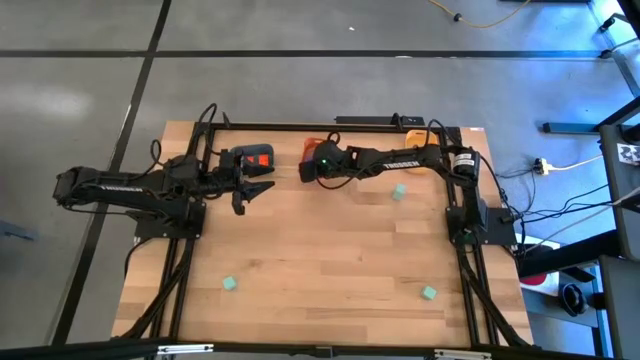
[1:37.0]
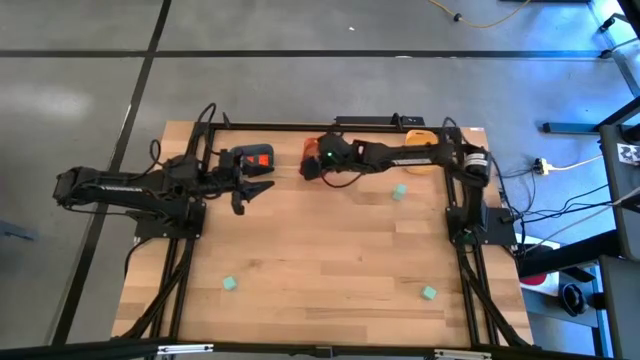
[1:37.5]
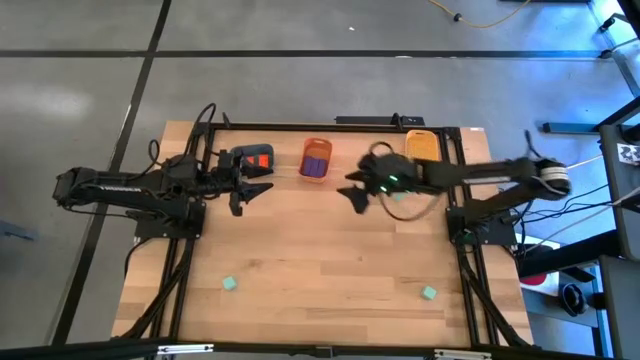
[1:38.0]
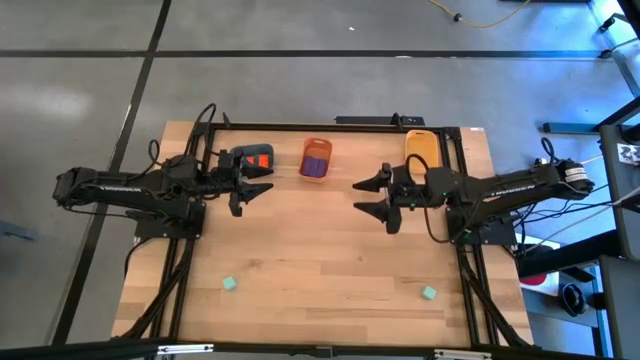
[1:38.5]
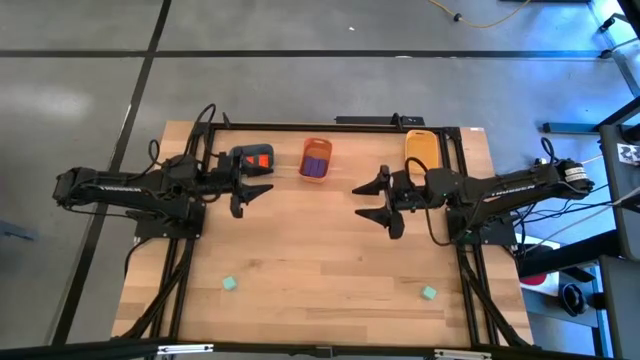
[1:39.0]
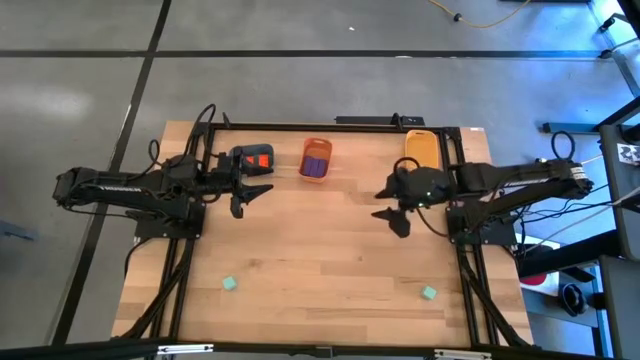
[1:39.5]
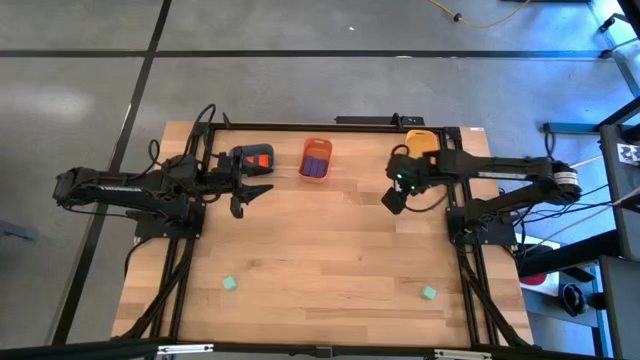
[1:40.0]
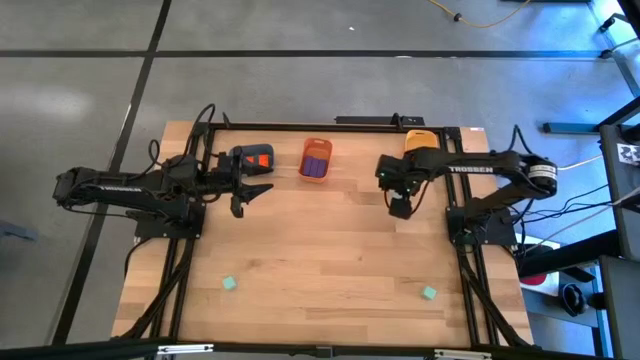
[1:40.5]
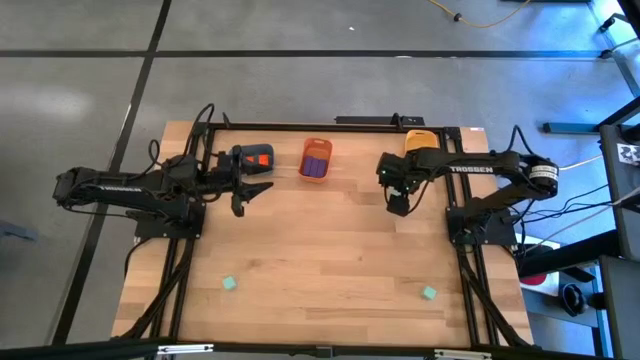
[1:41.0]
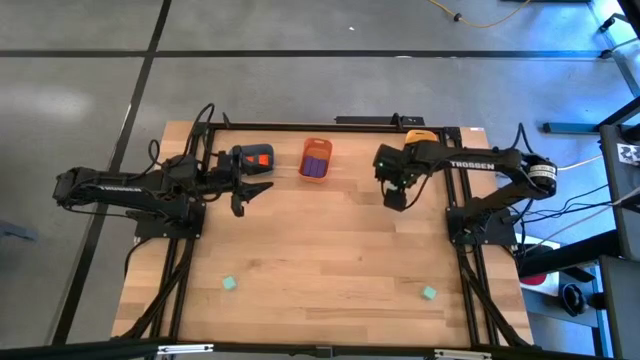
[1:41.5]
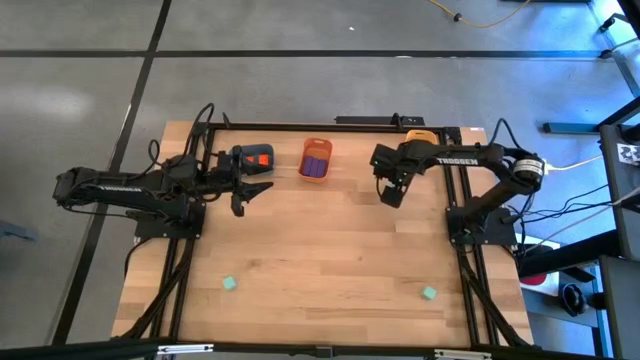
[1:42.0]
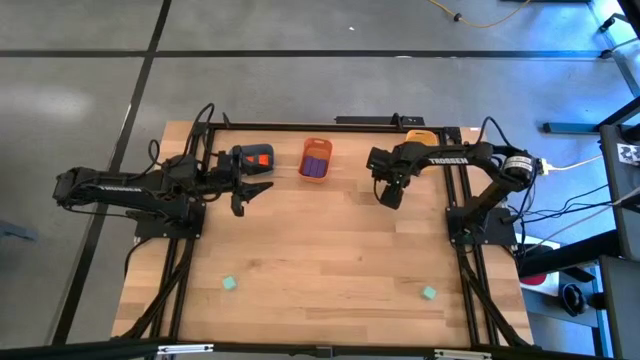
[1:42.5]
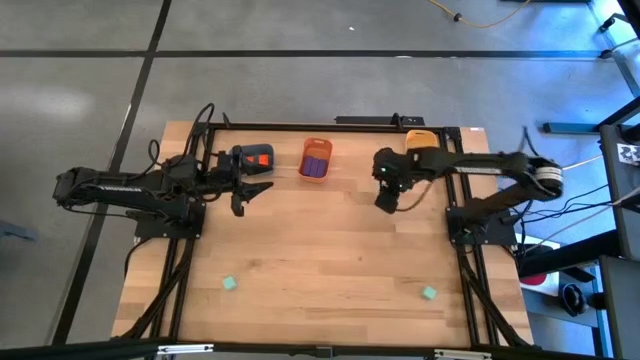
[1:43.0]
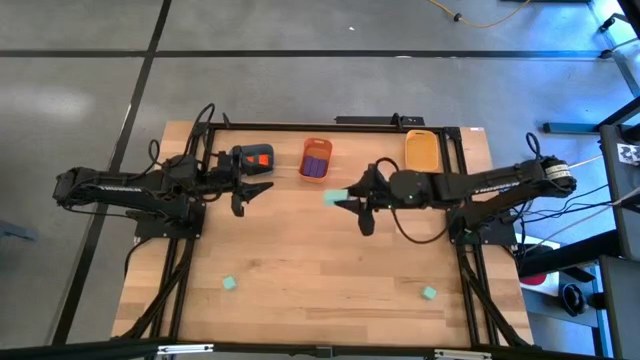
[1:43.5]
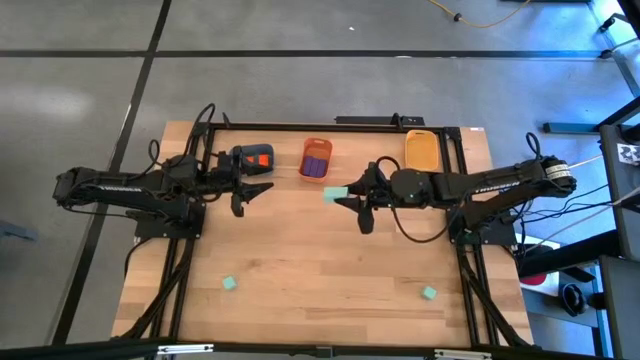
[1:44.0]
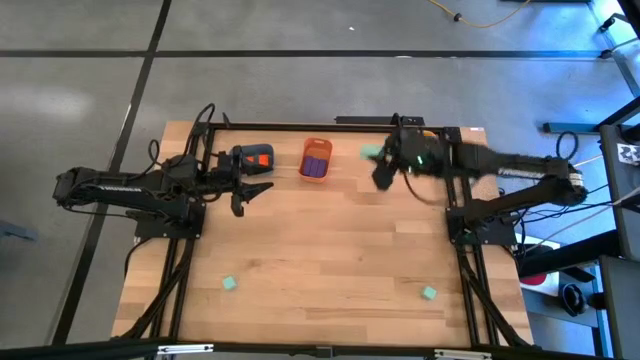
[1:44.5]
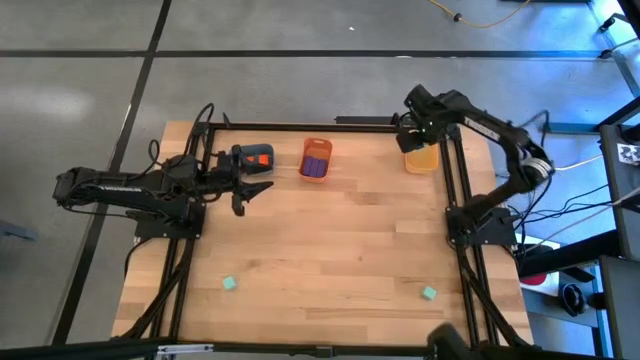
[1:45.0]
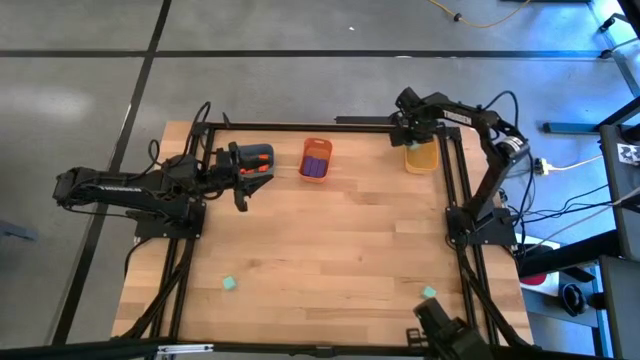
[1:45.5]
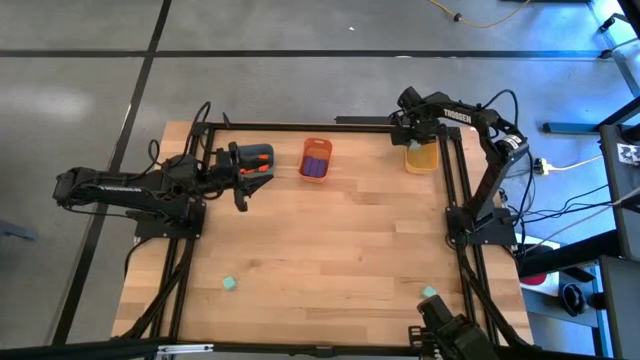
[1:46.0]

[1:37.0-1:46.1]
Task: Sort & place blocks by color
Put the top right blue block into the yellow bin

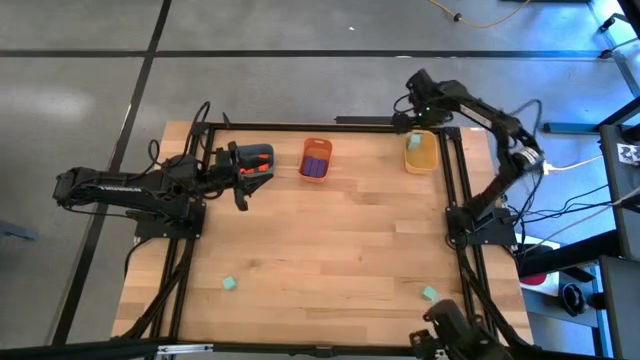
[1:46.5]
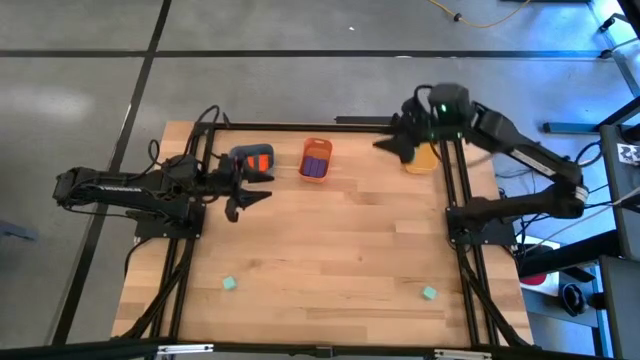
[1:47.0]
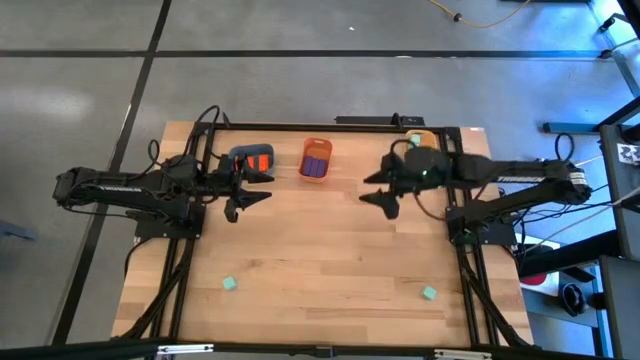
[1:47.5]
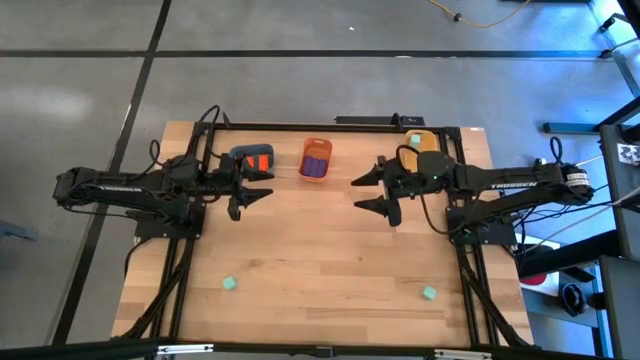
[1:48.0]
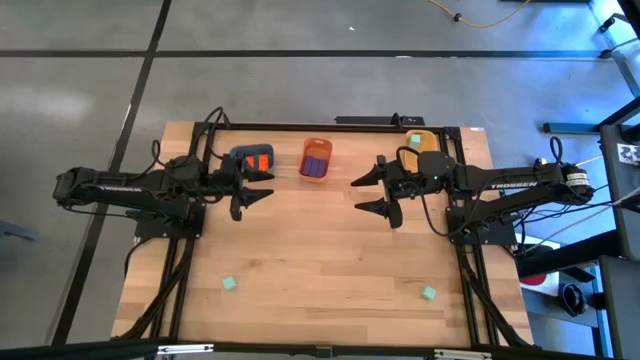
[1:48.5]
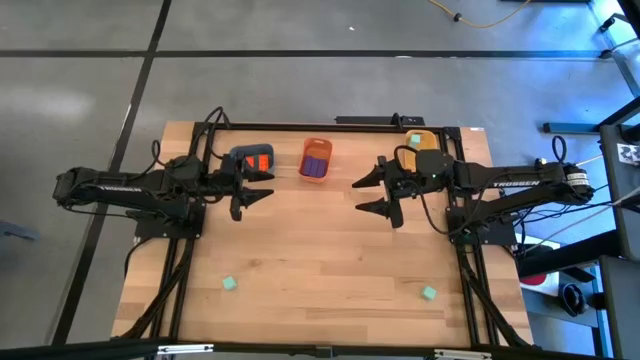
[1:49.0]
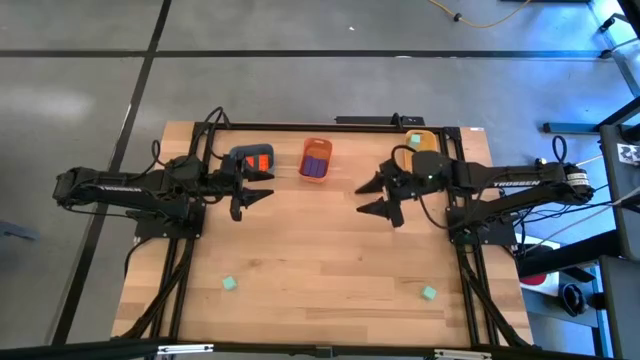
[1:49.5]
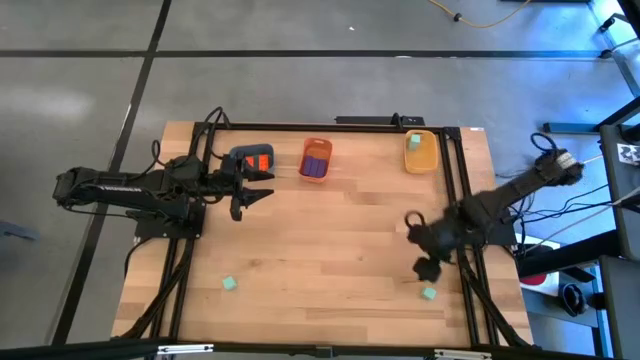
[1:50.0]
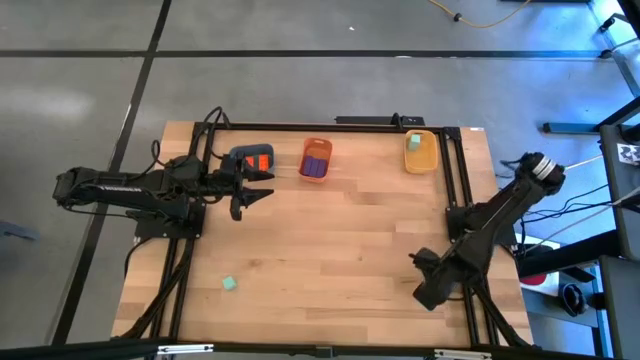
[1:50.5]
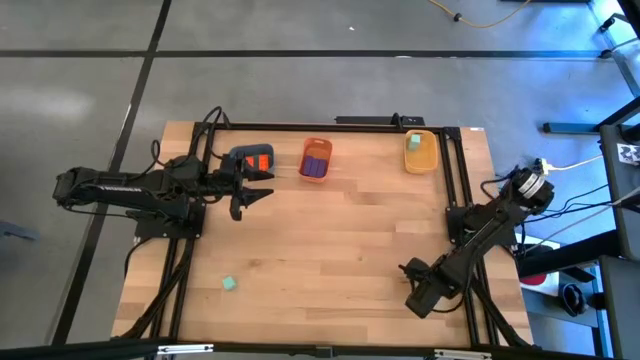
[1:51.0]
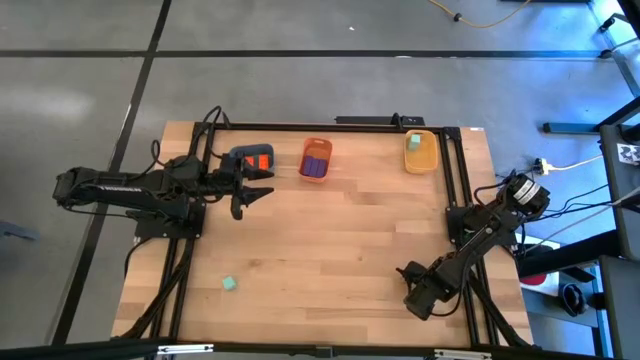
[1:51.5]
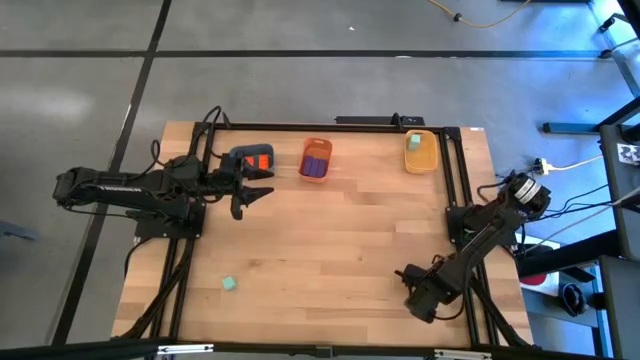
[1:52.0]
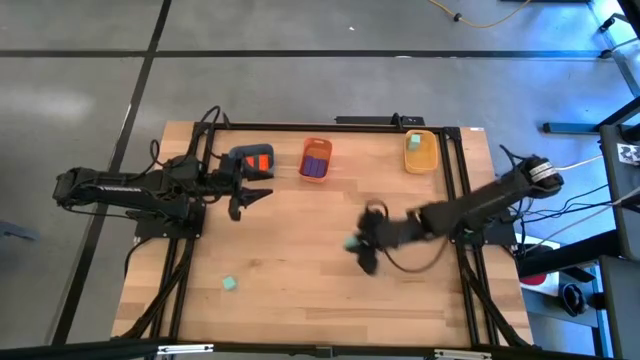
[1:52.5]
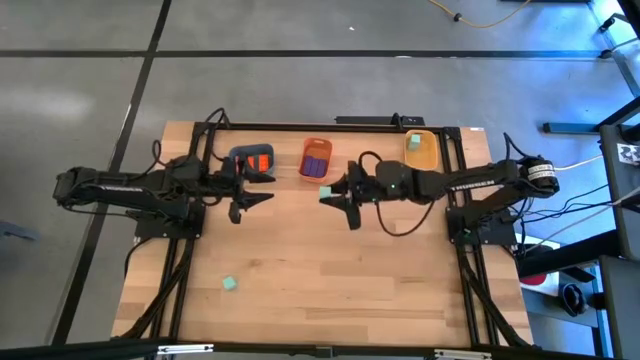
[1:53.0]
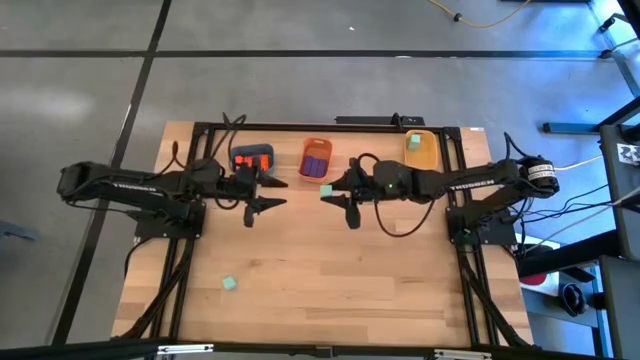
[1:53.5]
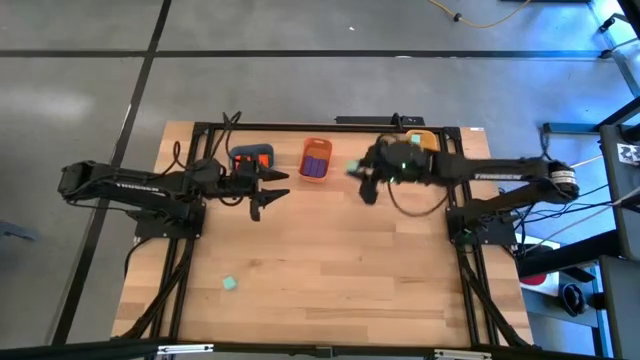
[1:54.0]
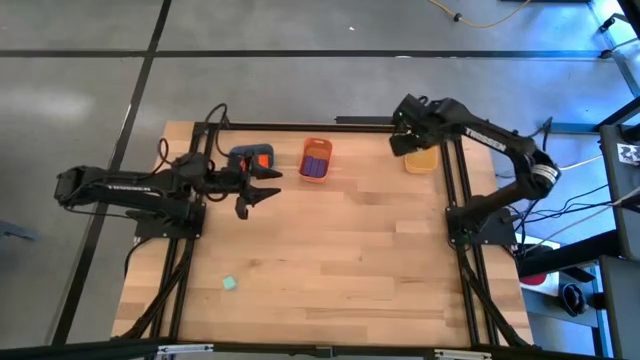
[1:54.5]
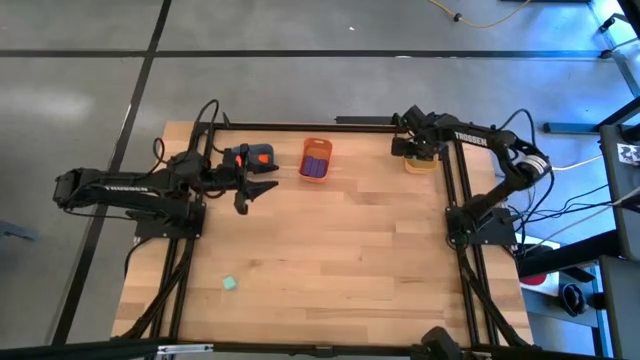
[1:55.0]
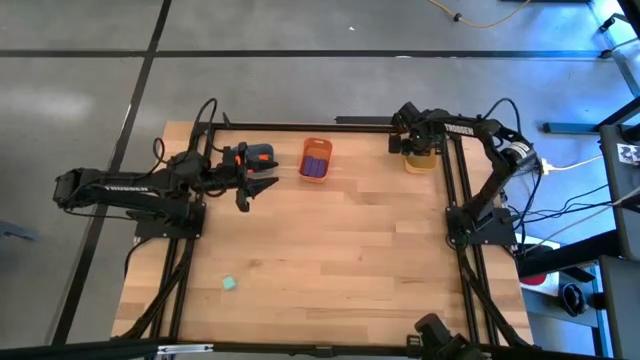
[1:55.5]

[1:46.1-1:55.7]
Put the right blue block into the yellow bin

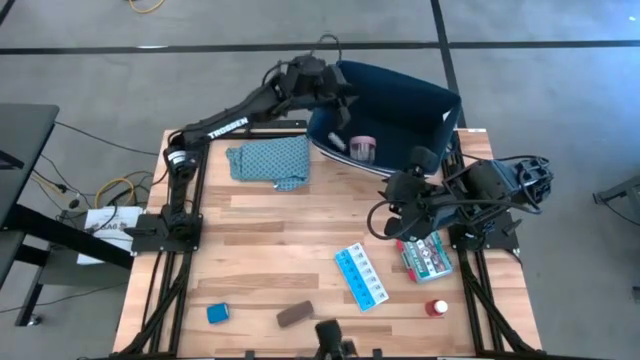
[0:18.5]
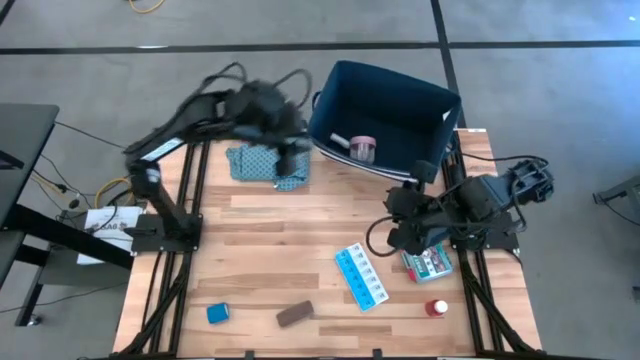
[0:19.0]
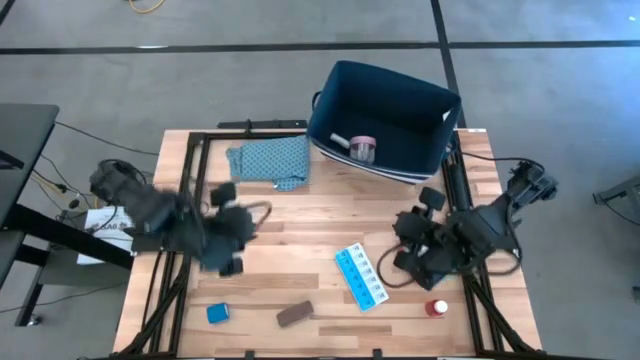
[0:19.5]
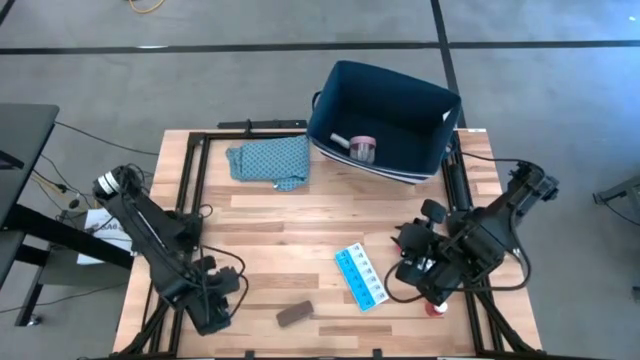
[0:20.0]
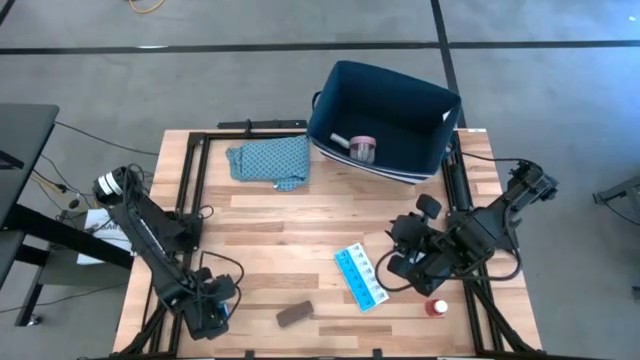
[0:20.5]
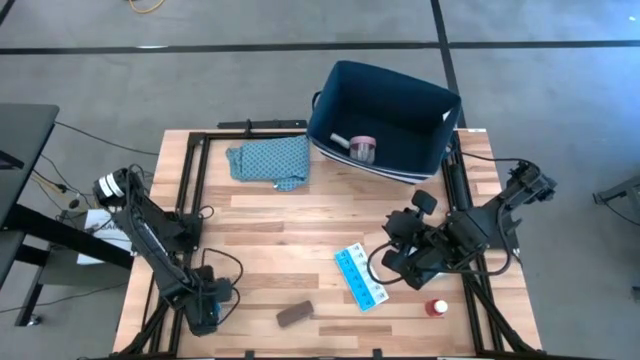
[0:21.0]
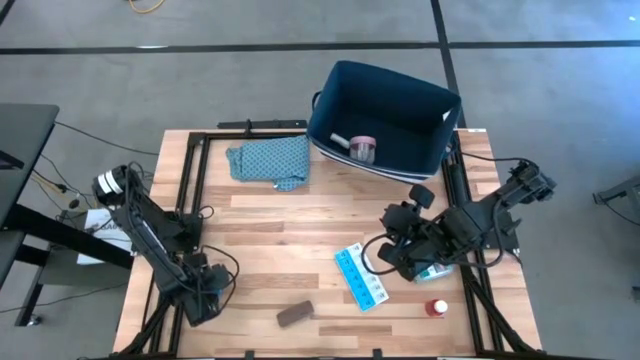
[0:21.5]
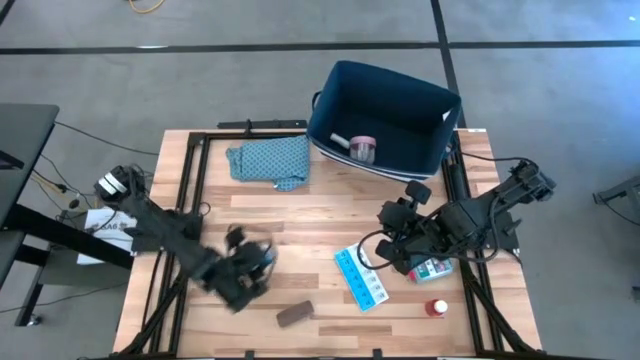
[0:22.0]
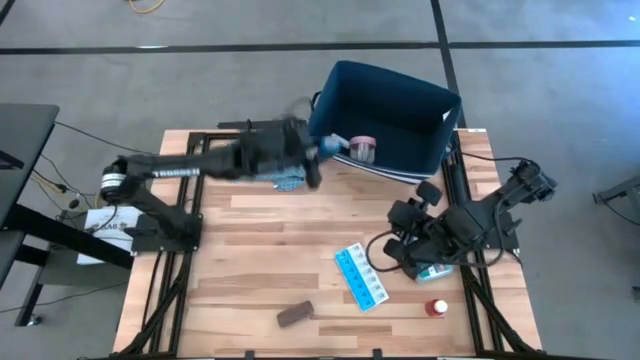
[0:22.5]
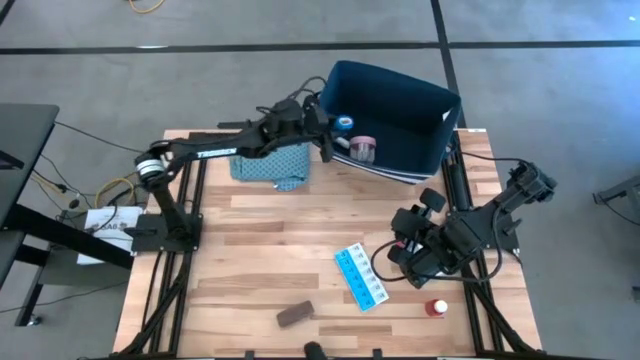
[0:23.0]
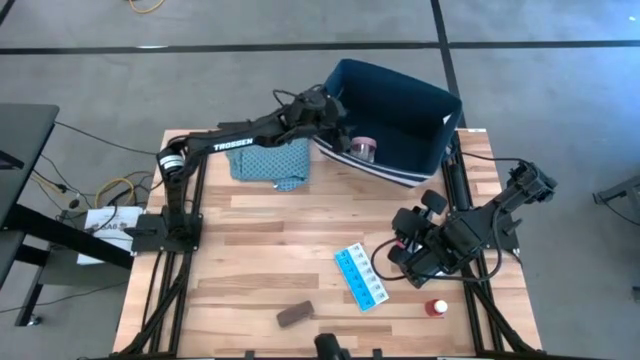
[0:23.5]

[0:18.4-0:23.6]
Task: Pick & place medical supplies in basket/bin
Put the blue bandage into the blue bin
